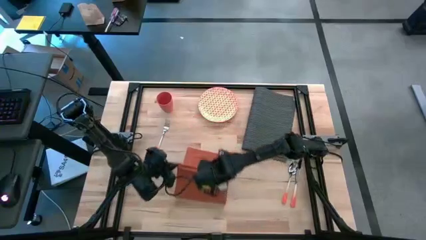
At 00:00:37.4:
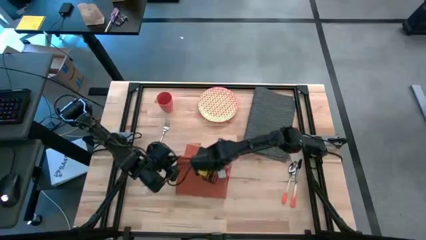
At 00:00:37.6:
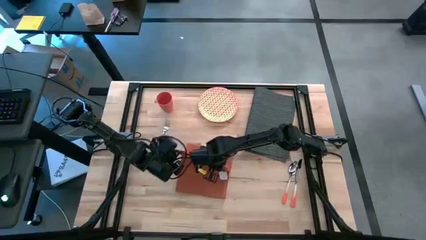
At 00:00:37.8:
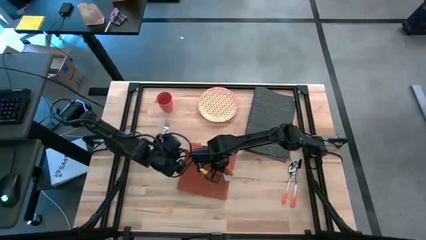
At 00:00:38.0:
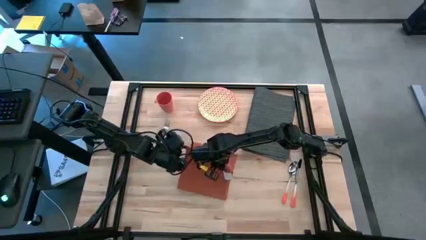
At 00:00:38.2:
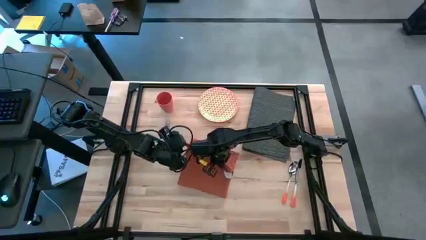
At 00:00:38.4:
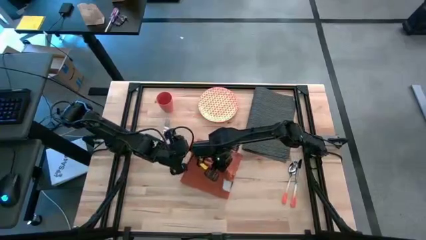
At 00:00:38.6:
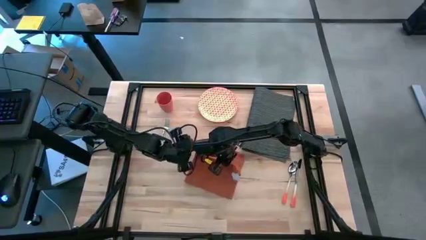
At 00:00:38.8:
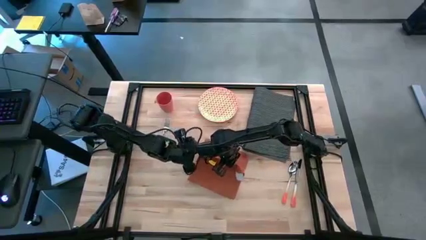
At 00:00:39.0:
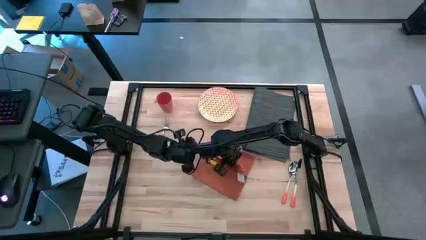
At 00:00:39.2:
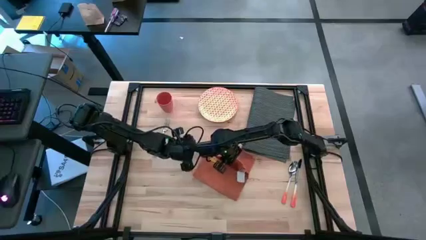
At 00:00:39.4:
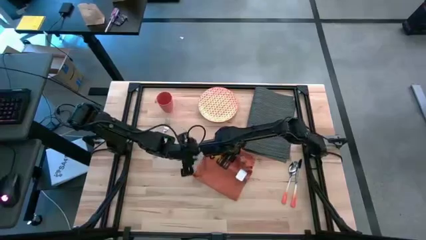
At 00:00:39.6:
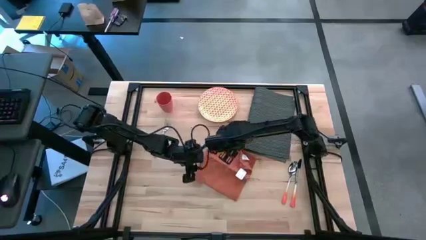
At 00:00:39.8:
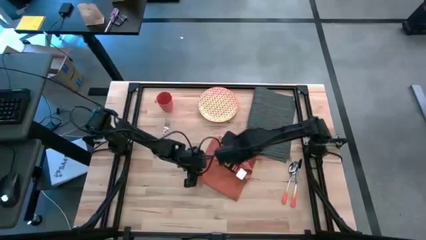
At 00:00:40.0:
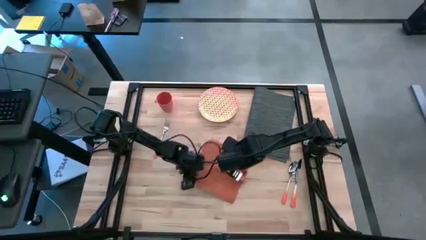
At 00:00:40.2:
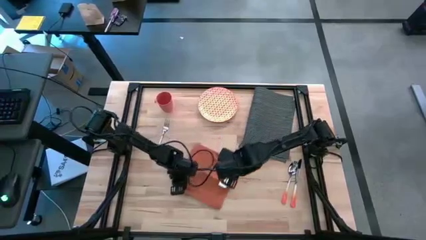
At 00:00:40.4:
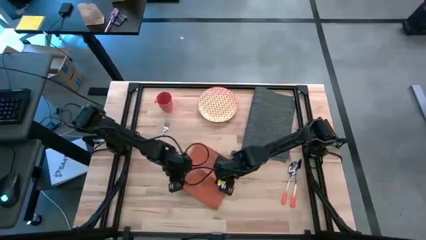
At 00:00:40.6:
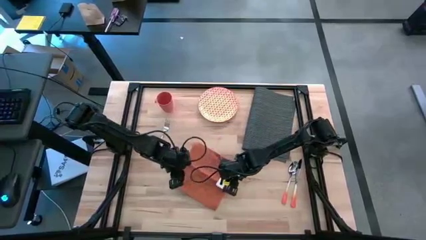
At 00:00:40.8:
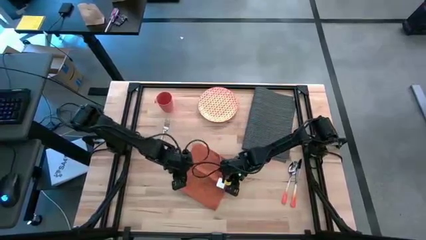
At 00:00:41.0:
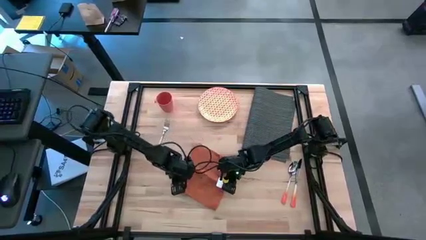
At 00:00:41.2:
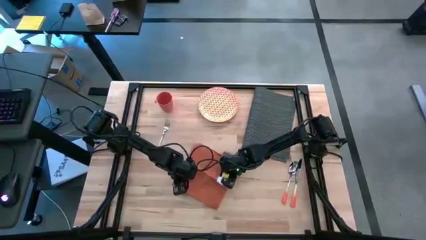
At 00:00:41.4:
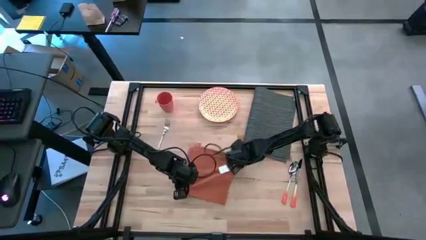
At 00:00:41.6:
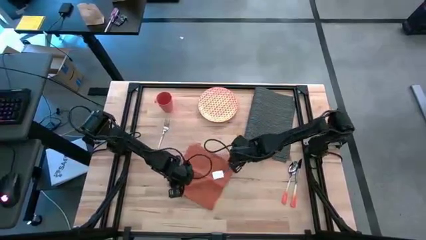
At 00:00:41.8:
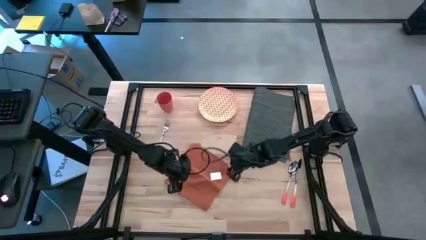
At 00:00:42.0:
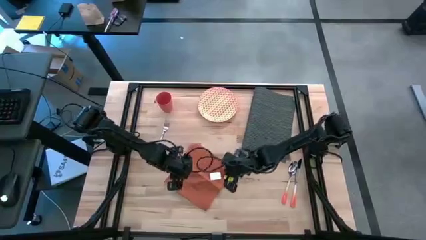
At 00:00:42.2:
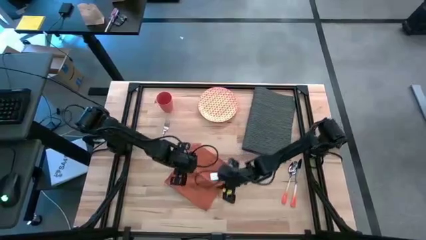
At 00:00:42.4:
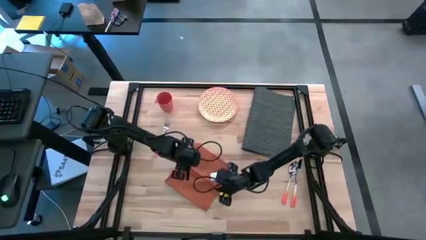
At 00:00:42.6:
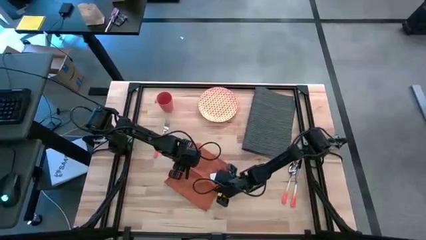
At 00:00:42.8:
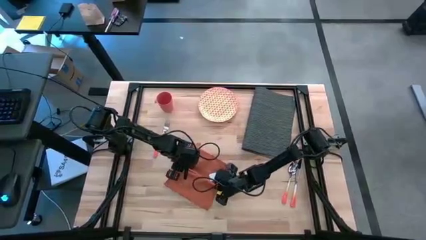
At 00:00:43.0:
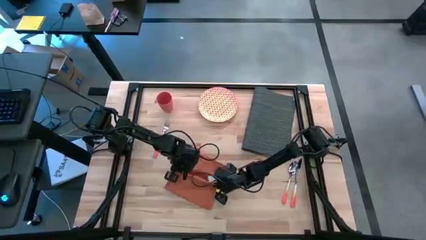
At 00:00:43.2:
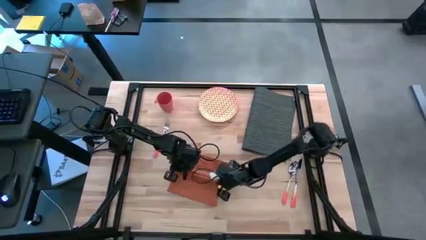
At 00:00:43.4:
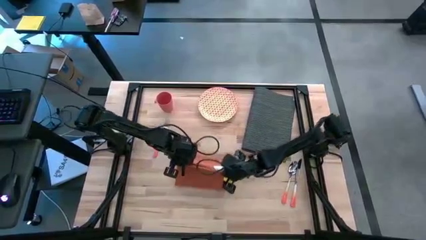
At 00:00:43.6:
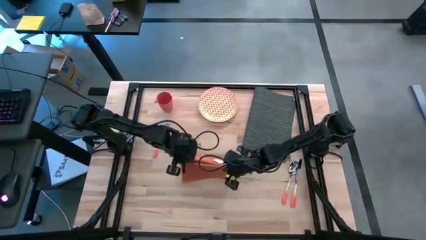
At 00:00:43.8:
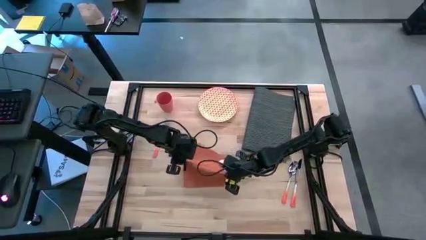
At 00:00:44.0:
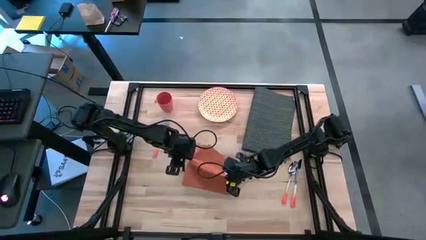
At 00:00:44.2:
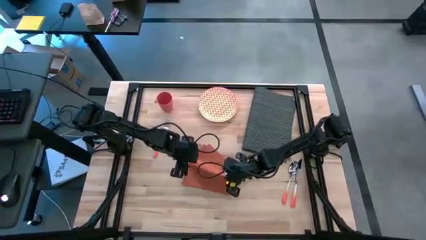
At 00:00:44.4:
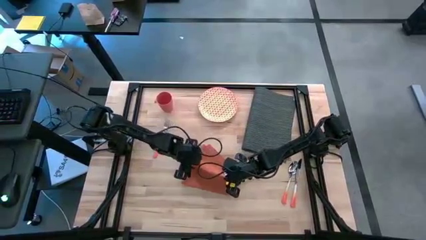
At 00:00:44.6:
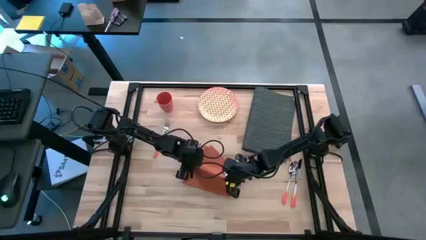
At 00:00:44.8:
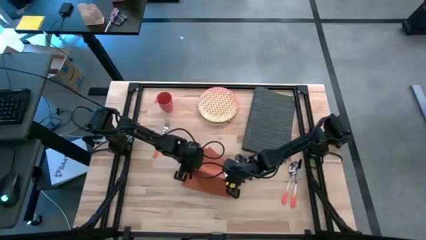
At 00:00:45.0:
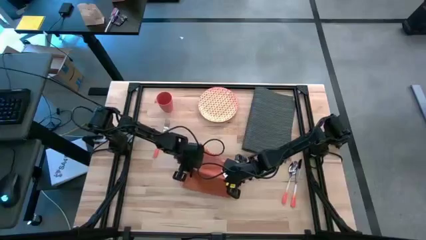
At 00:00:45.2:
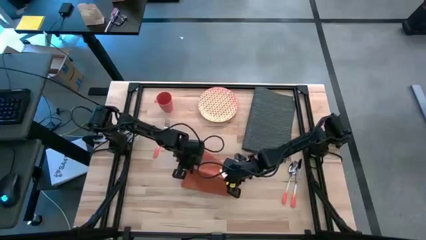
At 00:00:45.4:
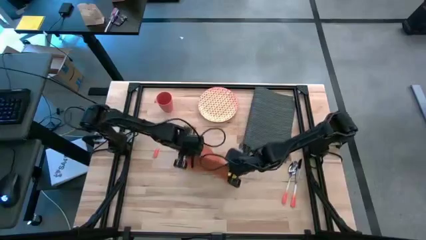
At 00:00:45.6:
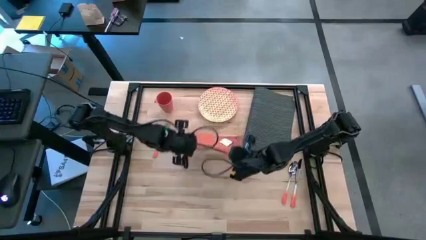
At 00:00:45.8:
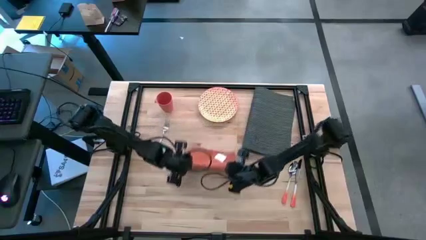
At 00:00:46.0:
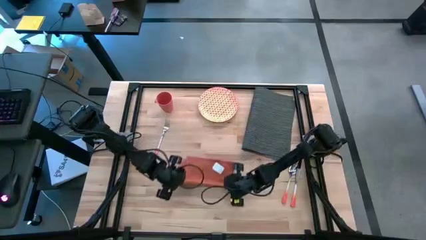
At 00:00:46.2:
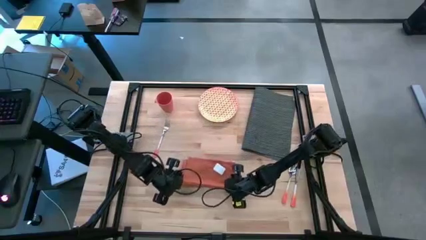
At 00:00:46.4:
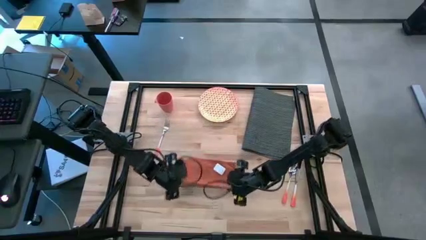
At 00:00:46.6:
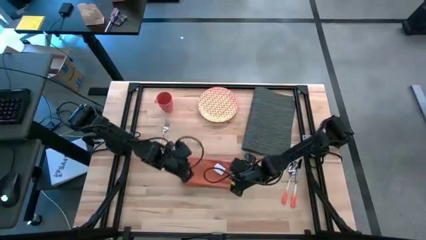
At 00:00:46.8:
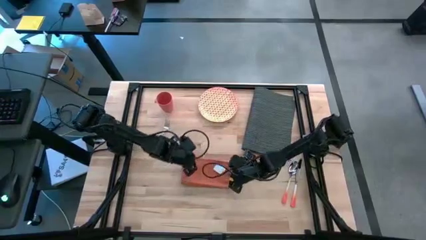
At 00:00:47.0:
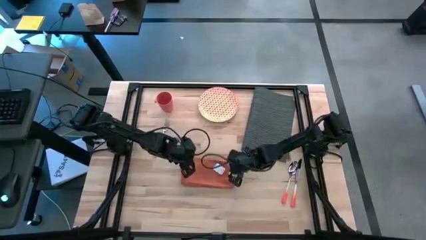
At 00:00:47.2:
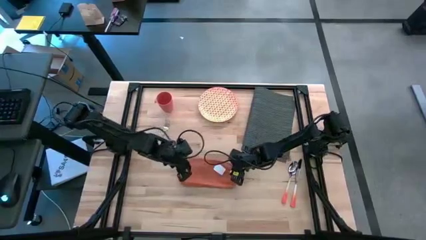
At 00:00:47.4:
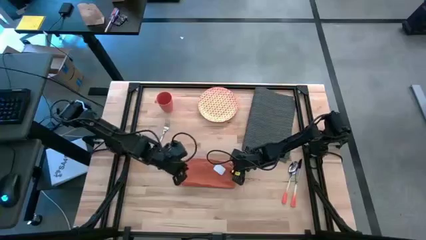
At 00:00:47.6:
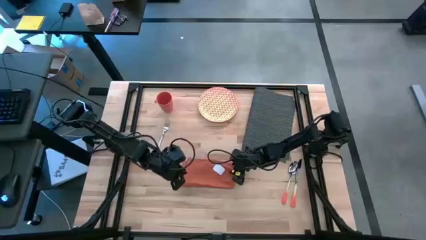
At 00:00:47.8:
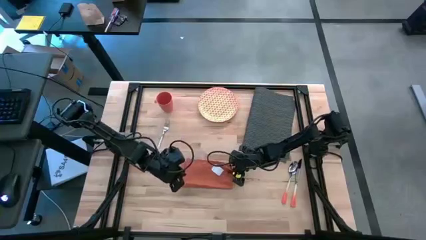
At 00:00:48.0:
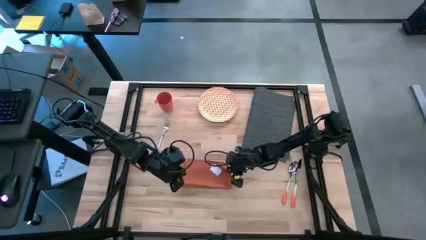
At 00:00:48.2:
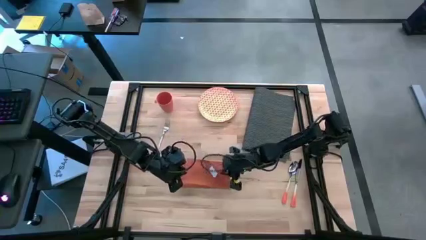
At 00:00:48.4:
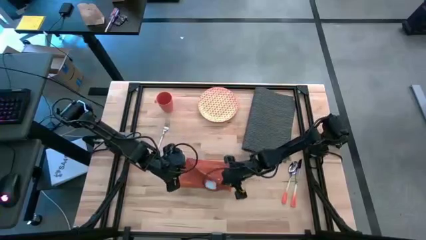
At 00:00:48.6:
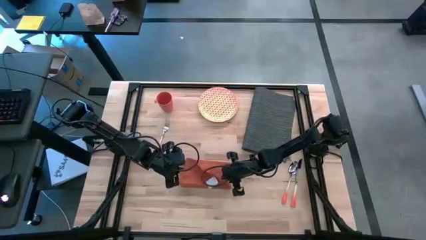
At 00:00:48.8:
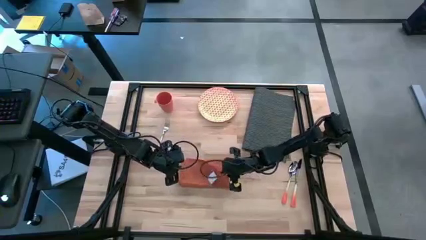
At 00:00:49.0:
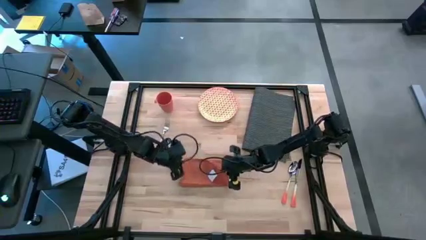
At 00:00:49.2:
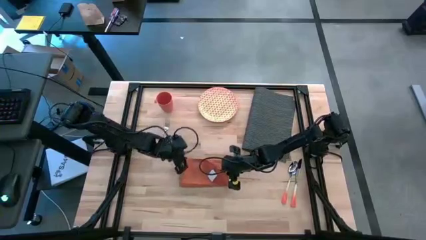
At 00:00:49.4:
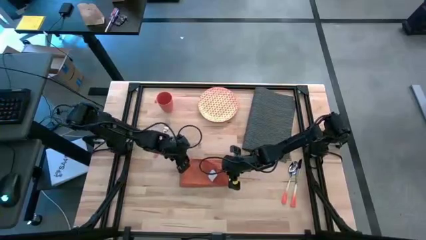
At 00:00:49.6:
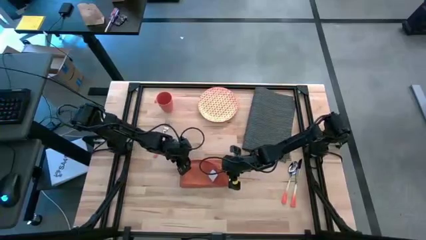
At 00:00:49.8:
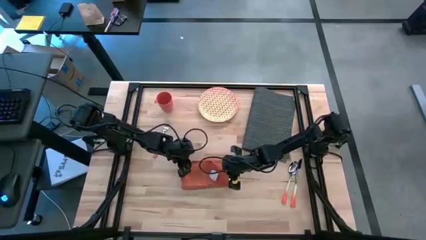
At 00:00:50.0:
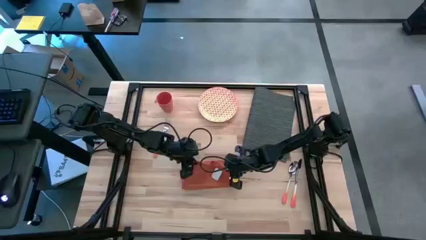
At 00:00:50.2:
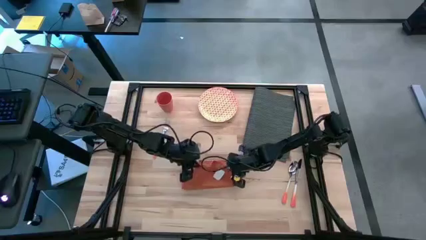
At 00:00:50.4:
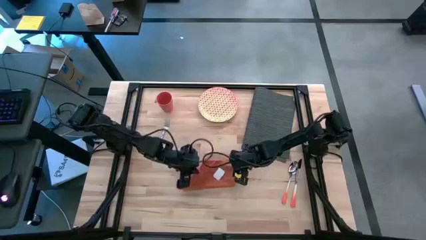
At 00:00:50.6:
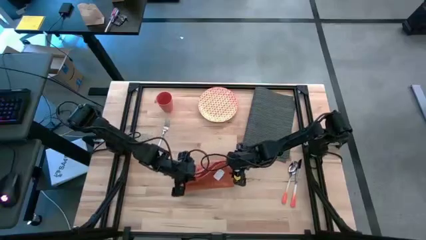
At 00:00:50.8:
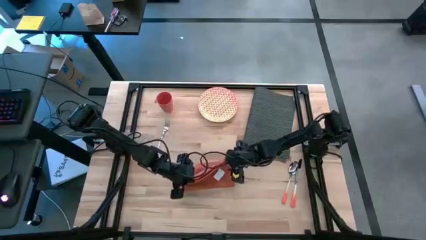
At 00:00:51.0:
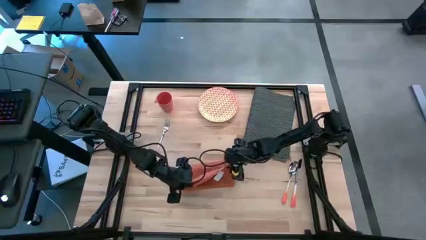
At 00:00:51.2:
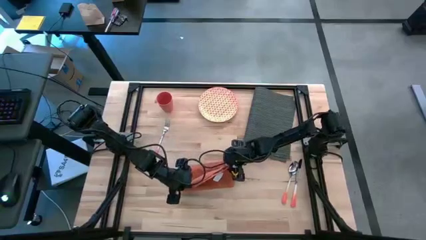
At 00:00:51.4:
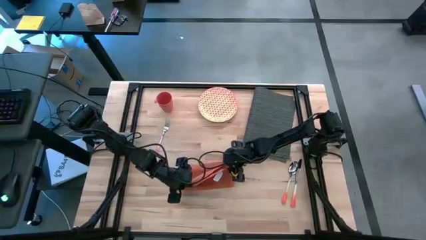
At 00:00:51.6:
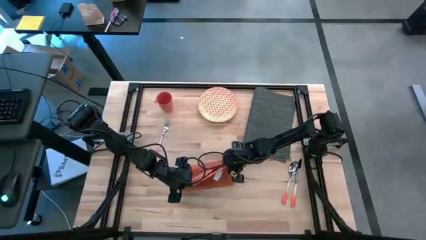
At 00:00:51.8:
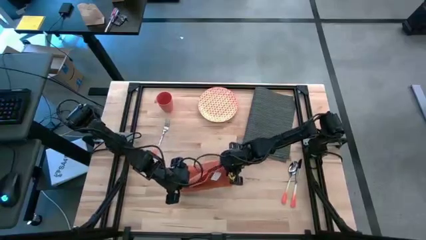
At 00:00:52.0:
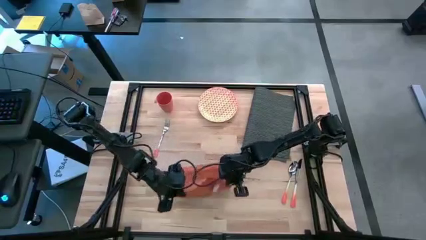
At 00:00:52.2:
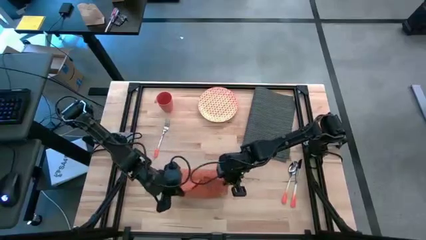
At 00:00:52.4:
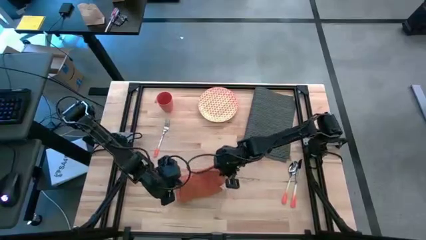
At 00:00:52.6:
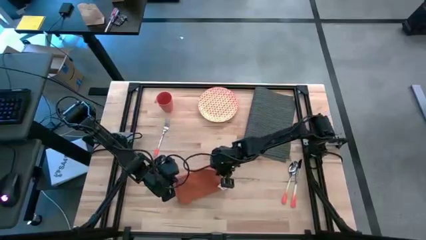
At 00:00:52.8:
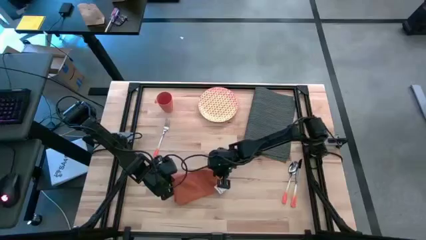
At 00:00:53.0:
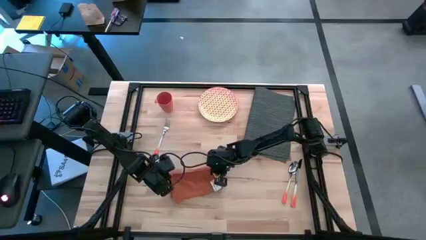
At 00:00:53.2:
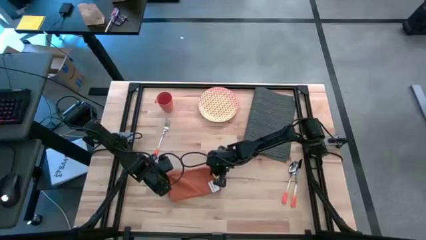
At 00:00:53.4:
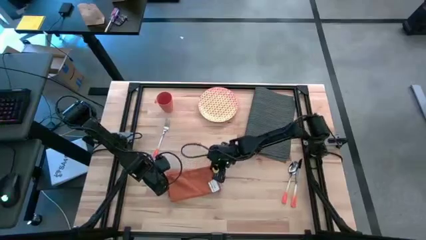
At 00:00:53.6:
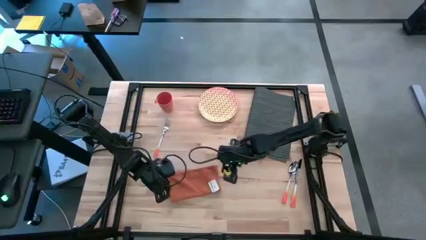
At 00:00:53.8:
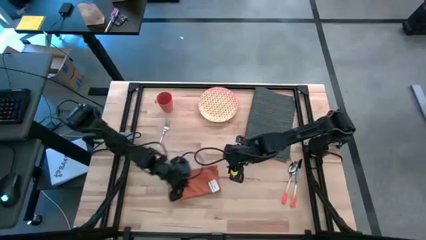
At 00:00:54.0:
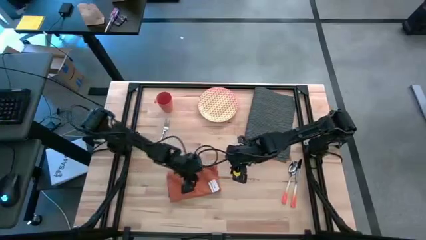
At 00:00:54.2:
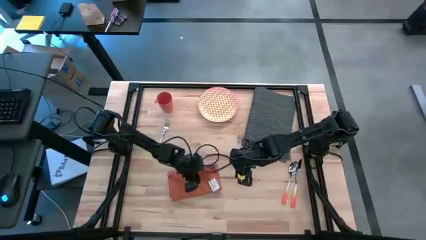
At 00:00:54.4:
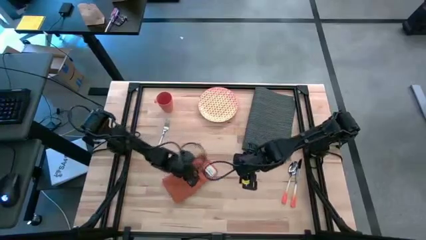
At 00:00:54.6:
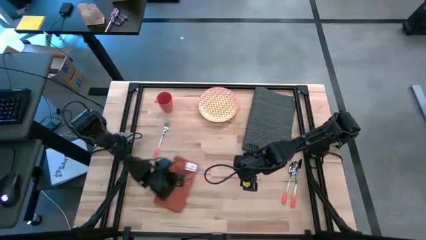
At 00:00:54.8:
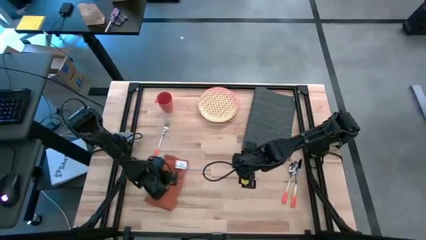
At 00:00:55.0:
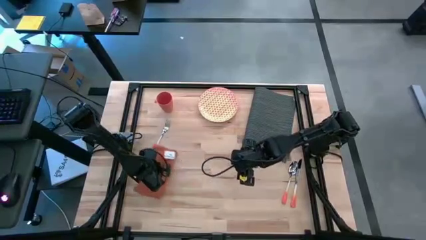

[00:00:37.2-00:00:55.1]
Task: Set table place
Fold the orange table napkin
